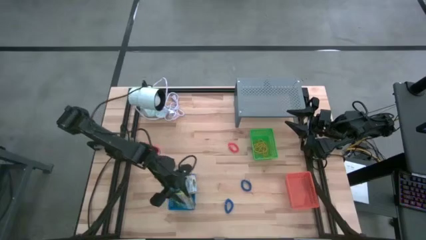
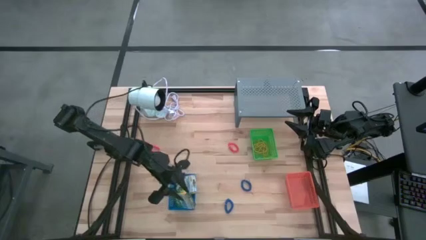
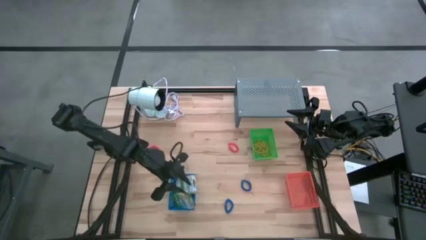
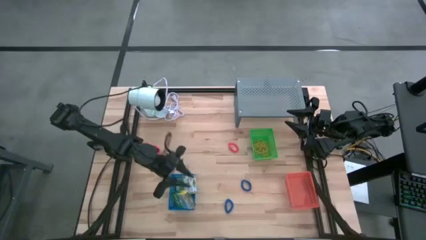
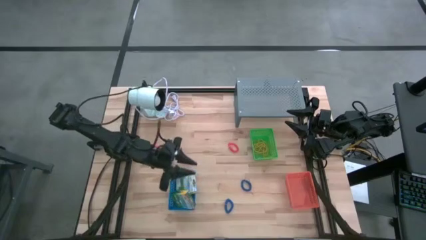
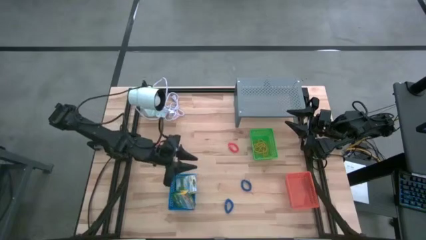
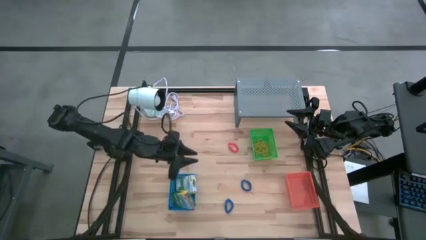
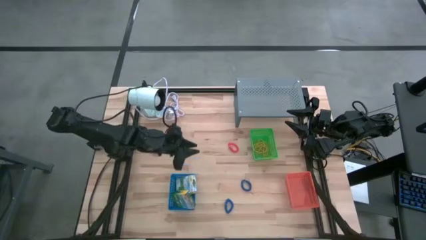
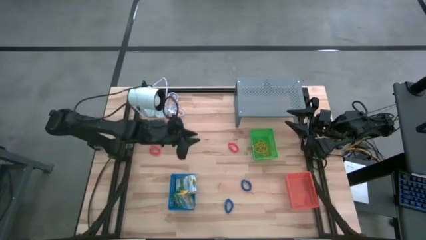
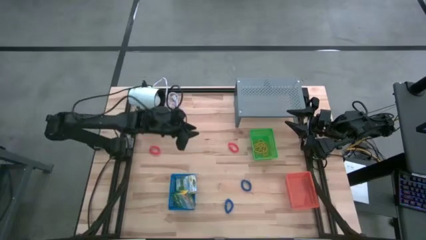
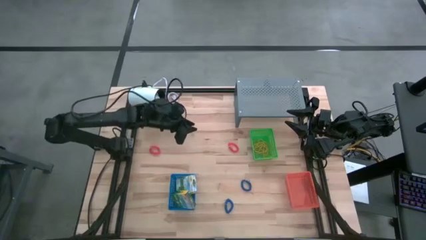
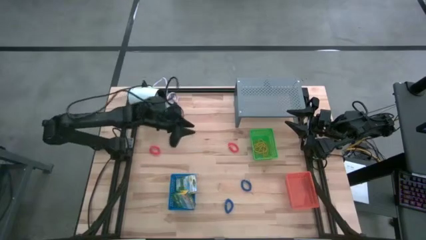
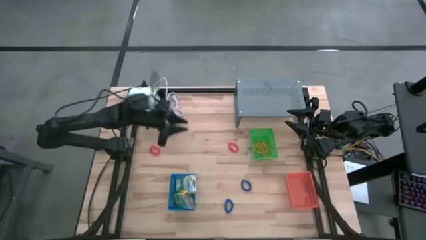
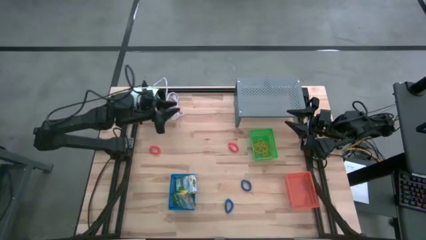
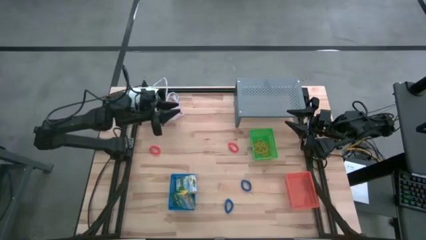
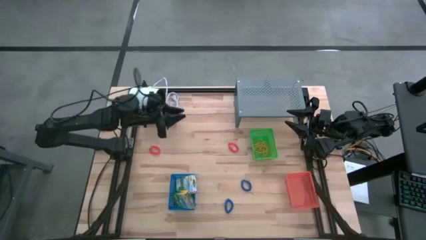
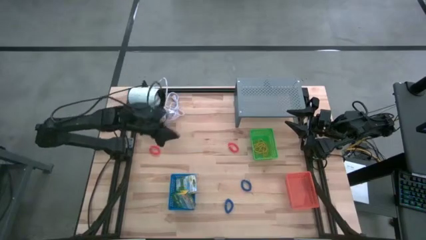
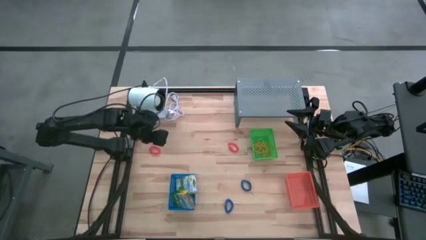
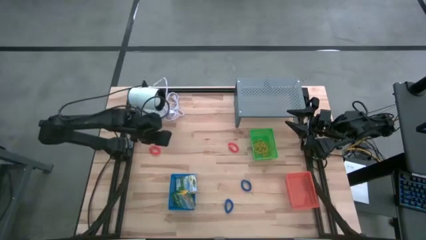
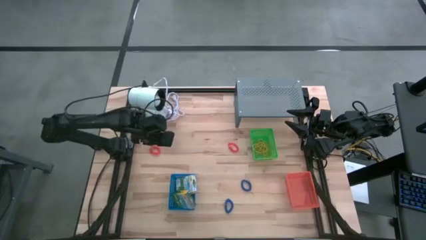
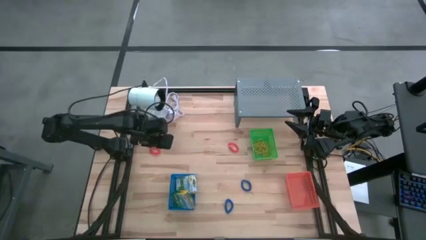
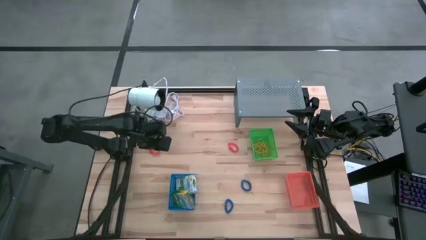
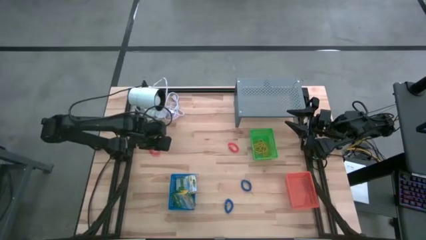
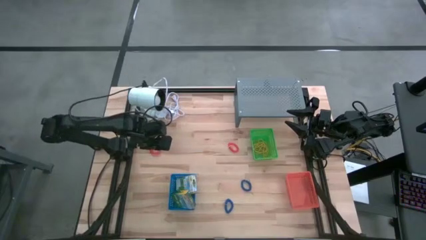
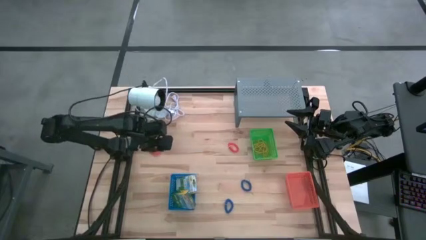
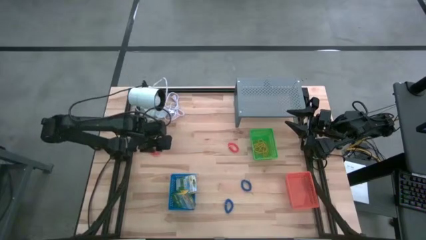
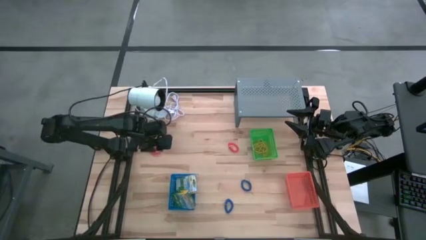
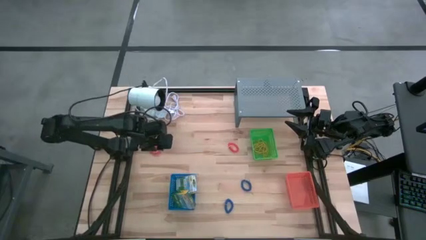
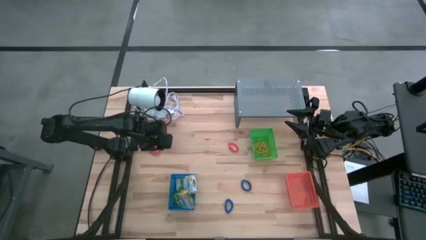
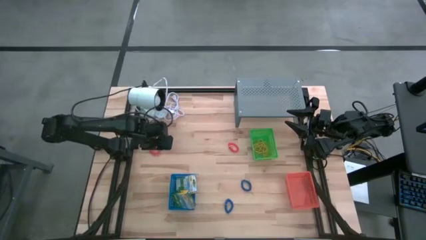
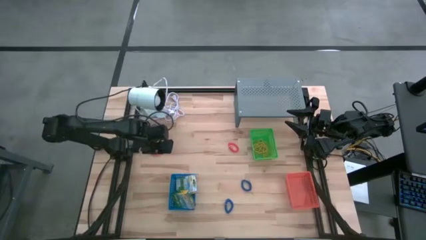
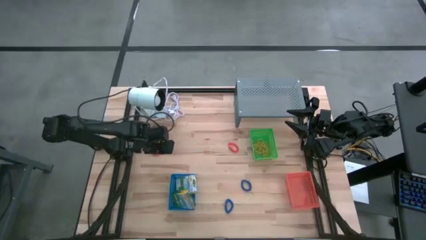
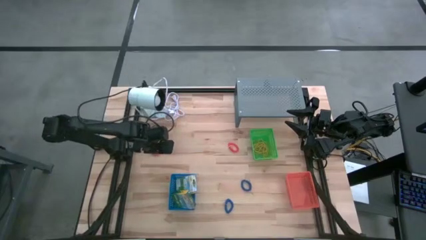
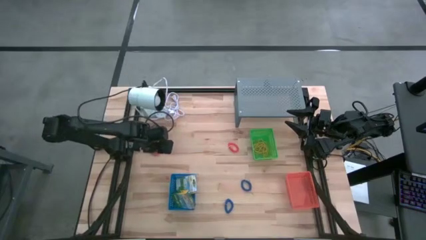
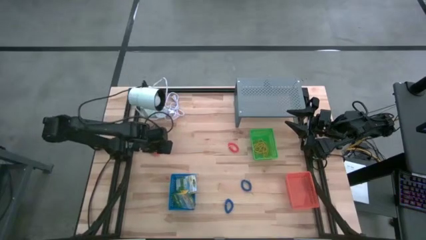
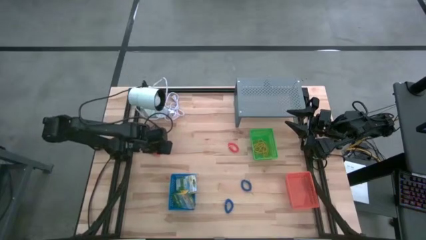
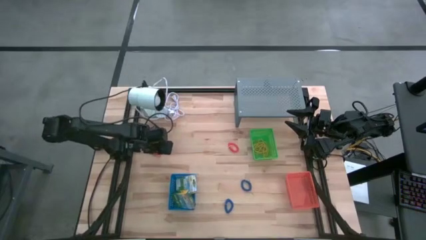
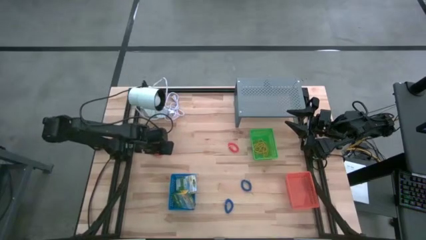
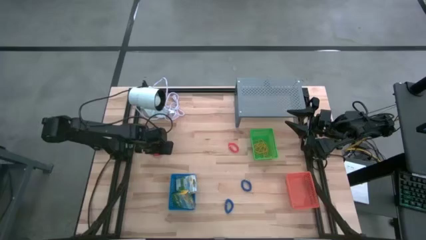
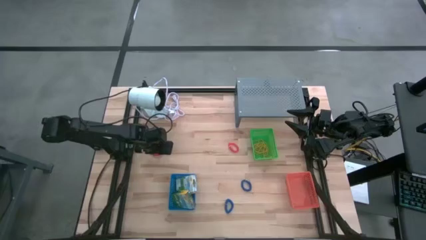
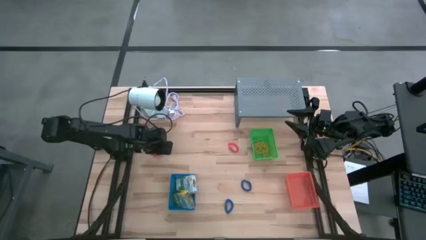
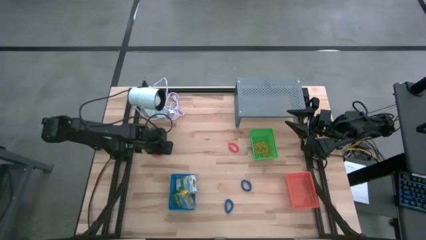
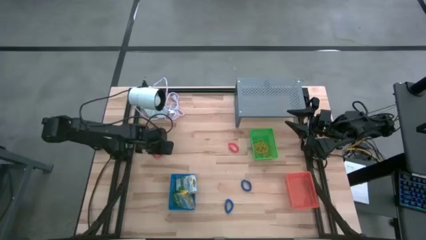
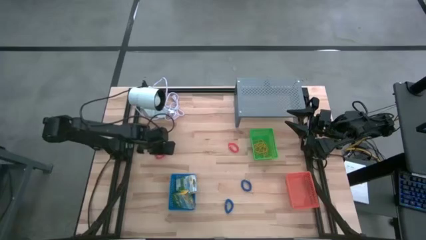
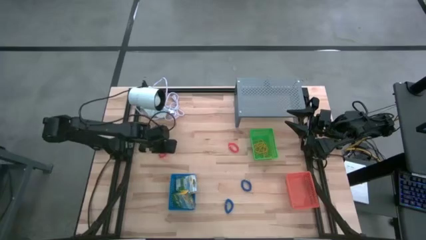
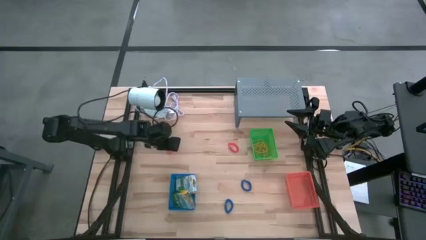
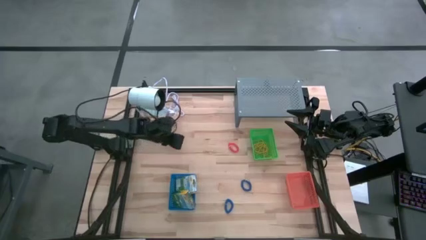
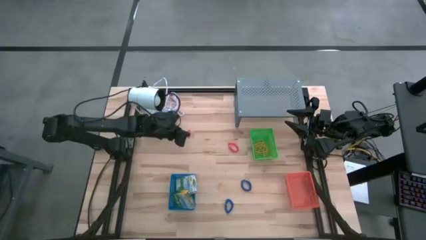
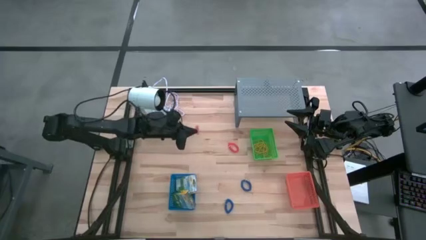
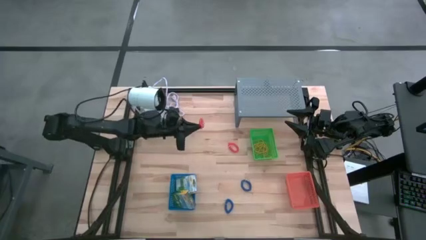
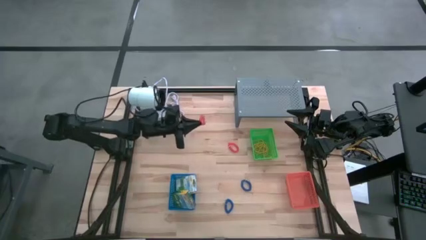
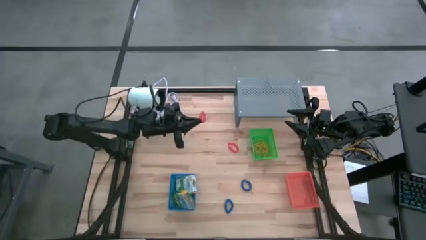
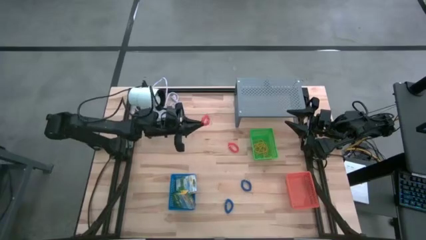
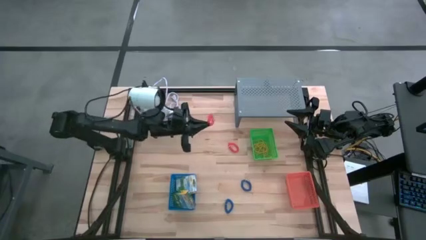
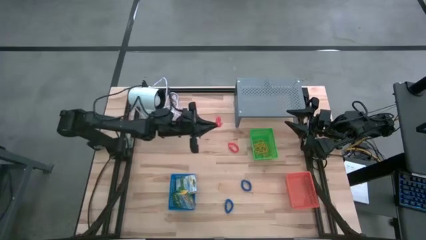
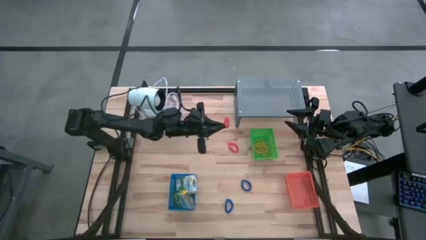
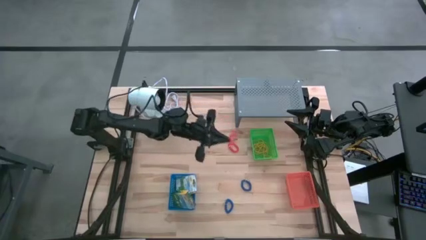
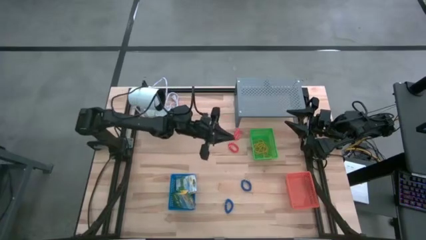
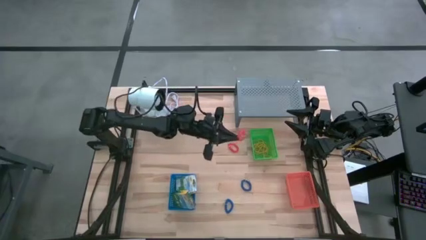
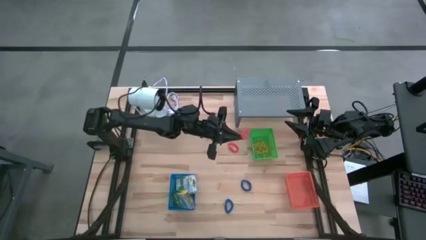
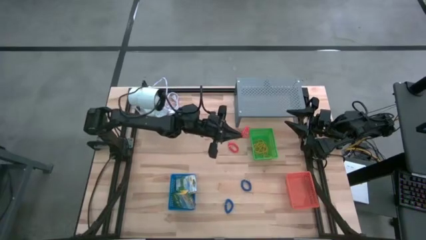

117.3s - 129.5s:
Task: Pick & Place Office Desk Supplies
Put the orange spring keychain into the orange bin

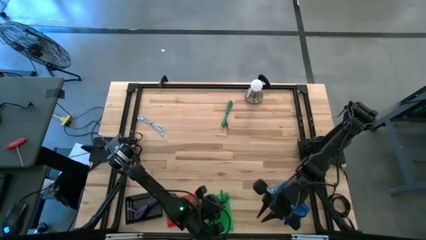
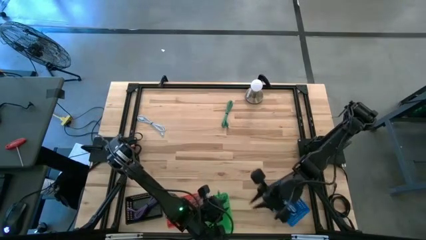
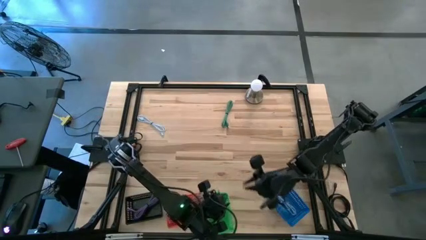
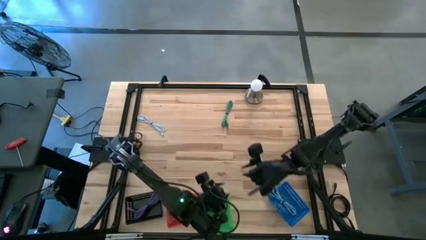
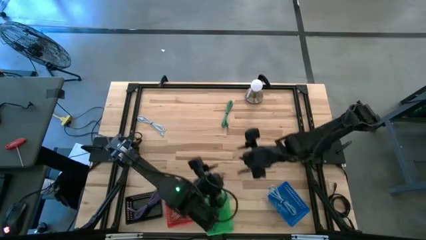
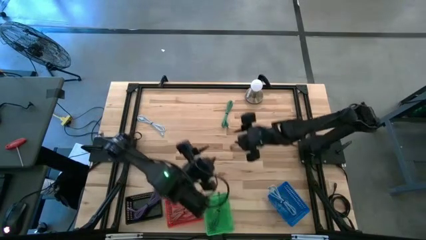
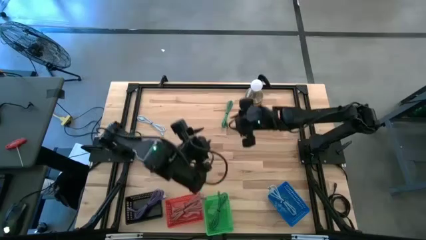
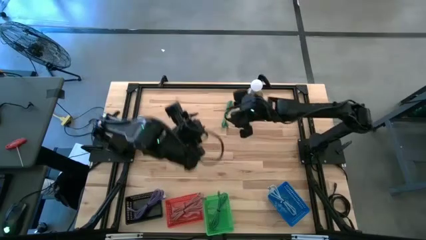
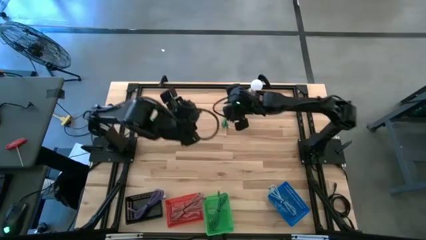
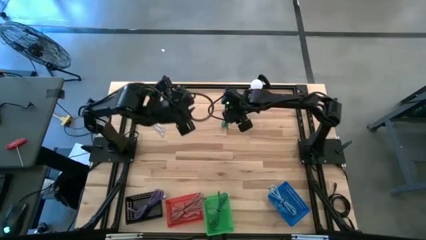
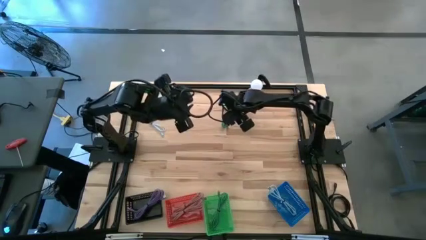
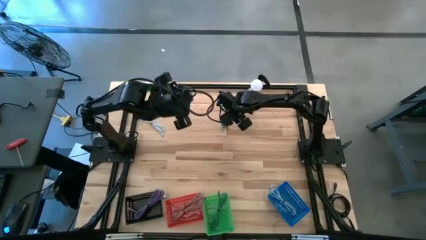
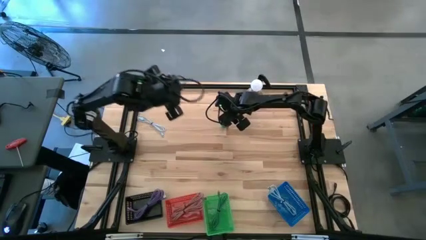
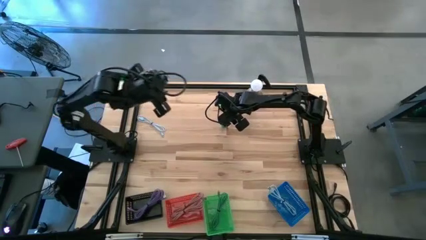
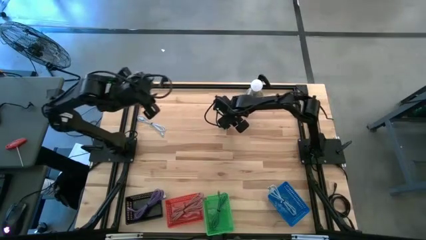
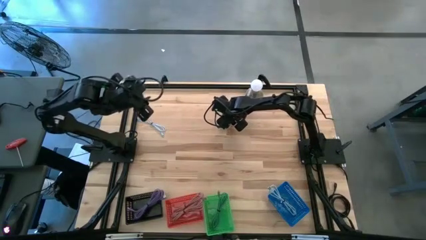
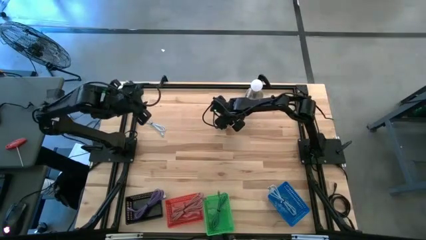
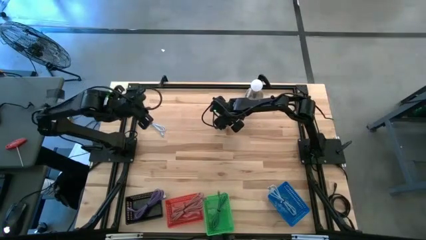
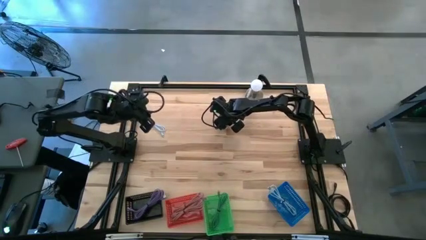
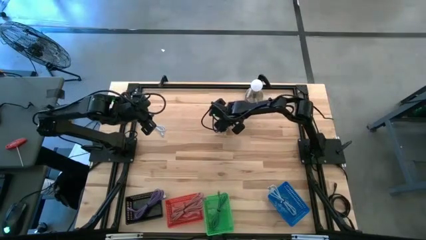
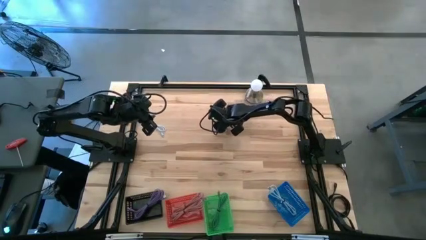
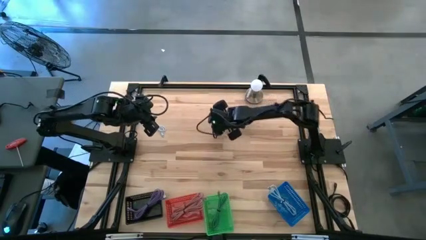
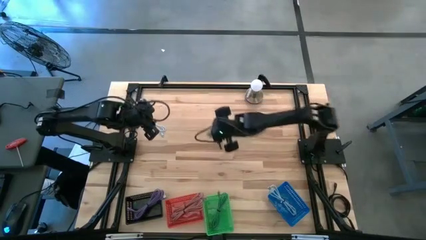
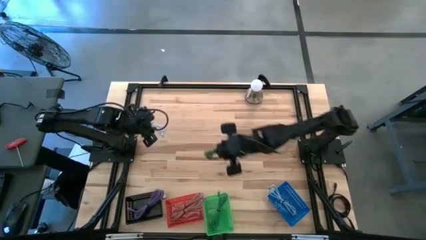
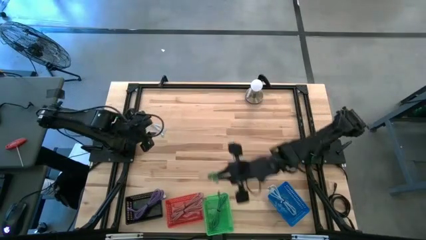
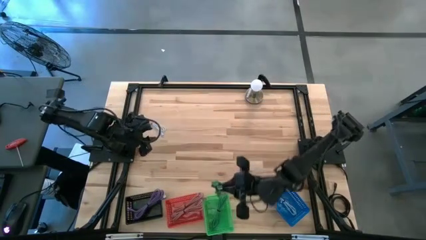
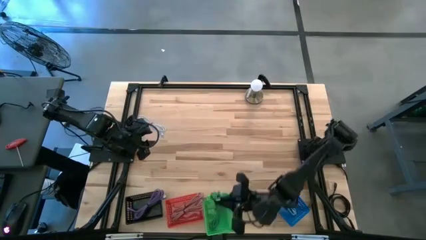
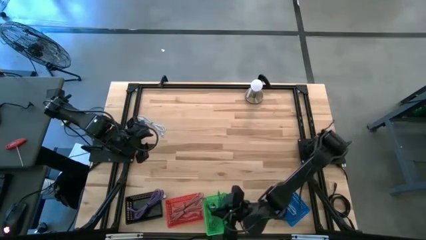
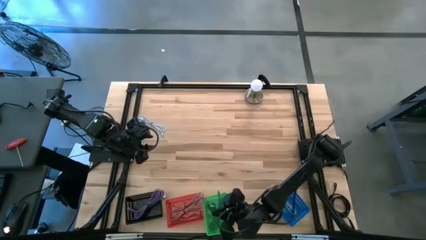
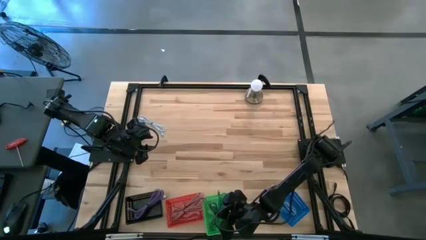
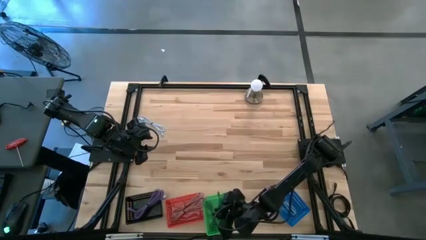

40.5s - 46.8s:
Task: Pick & Place USB Port
Put the green USB charger into the green bin
